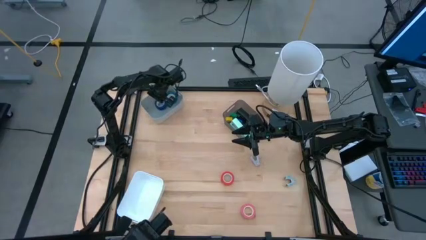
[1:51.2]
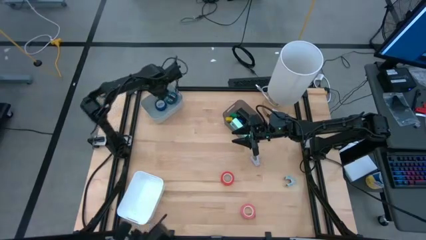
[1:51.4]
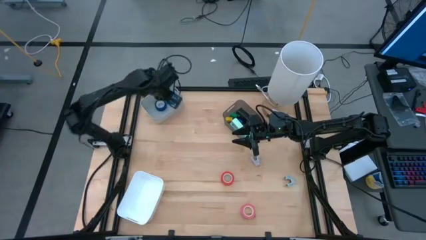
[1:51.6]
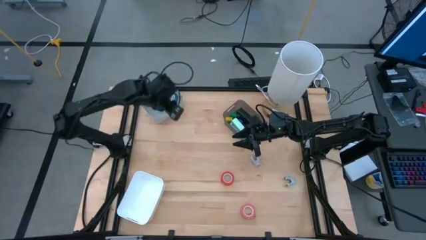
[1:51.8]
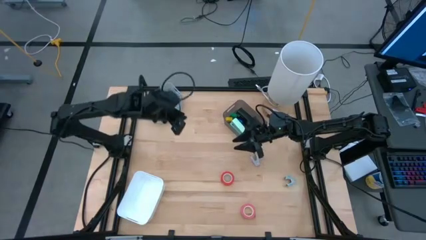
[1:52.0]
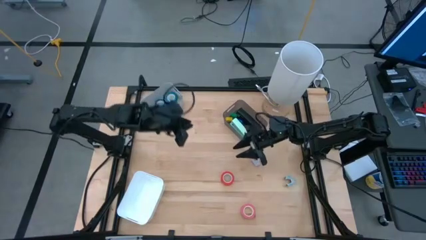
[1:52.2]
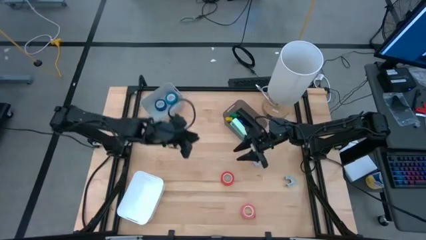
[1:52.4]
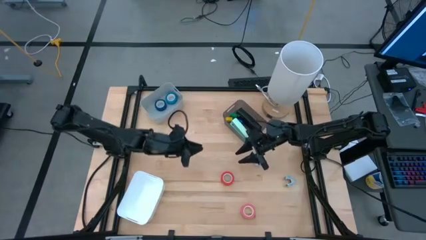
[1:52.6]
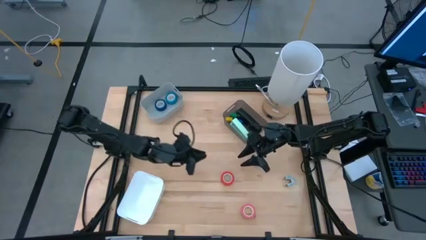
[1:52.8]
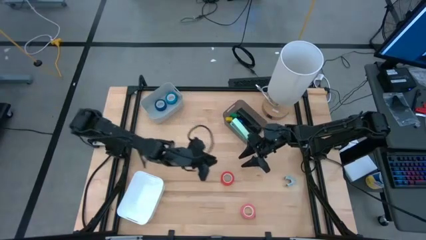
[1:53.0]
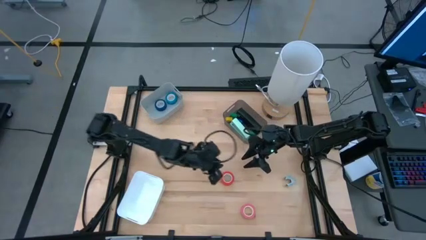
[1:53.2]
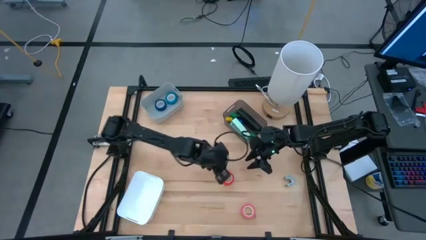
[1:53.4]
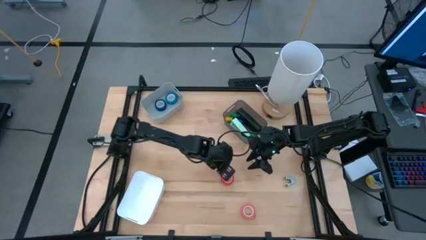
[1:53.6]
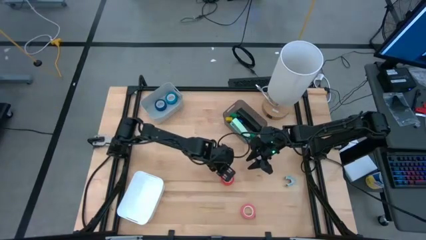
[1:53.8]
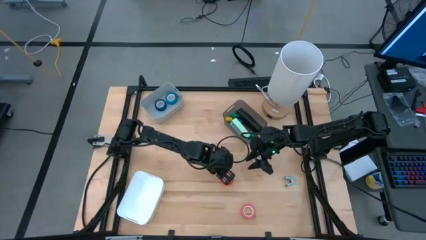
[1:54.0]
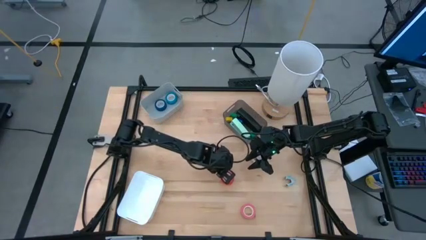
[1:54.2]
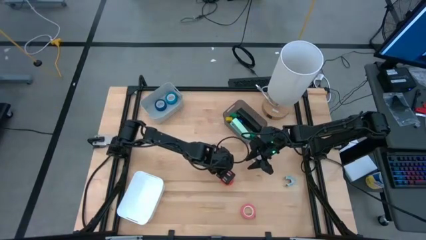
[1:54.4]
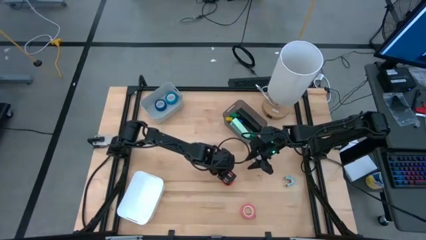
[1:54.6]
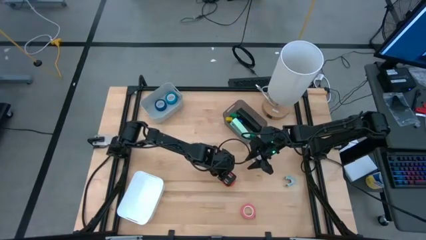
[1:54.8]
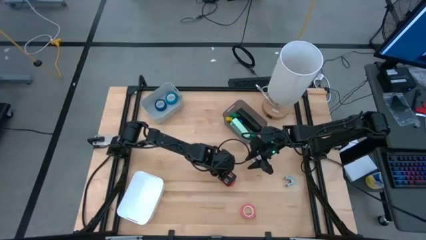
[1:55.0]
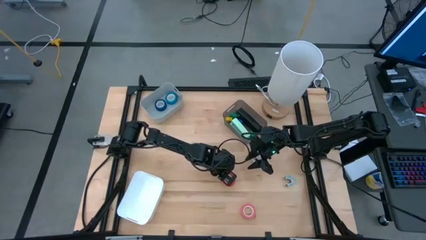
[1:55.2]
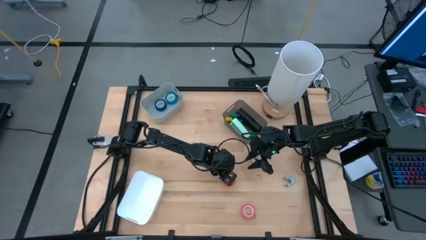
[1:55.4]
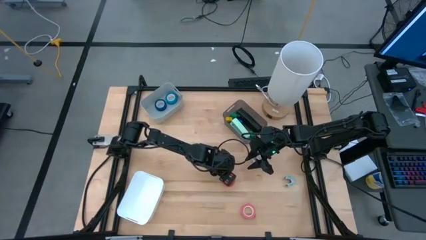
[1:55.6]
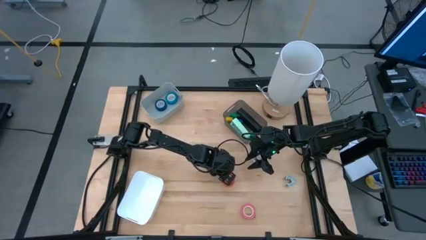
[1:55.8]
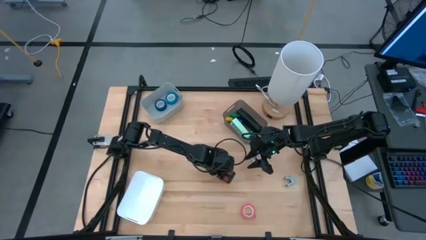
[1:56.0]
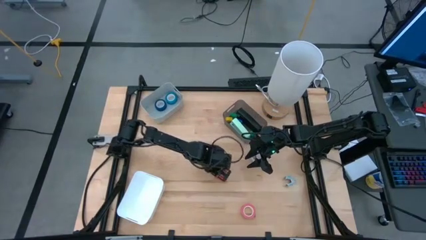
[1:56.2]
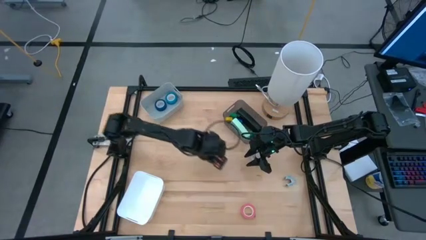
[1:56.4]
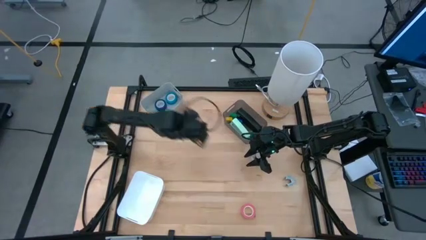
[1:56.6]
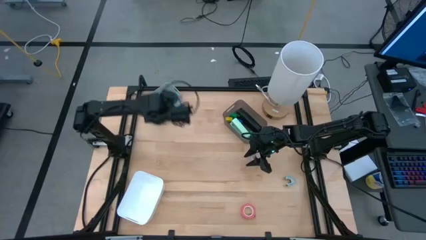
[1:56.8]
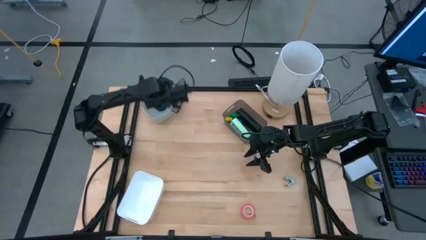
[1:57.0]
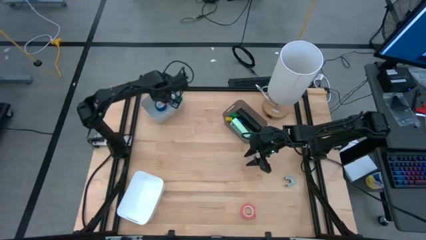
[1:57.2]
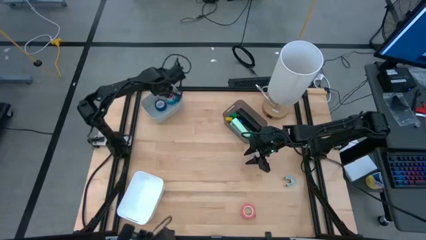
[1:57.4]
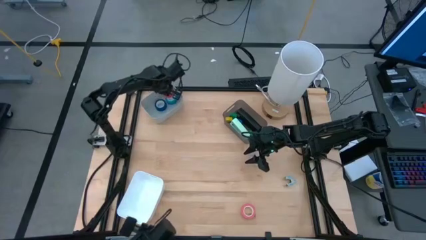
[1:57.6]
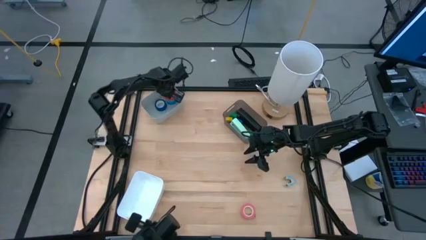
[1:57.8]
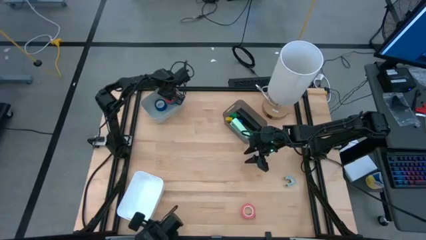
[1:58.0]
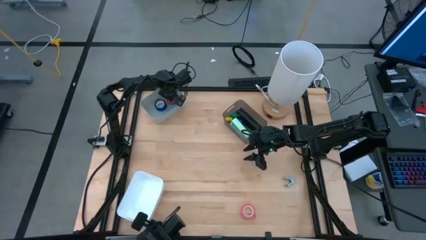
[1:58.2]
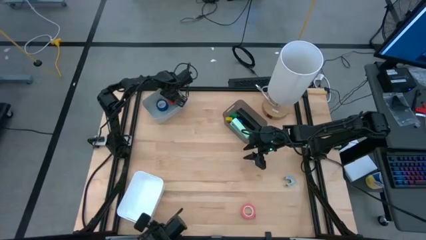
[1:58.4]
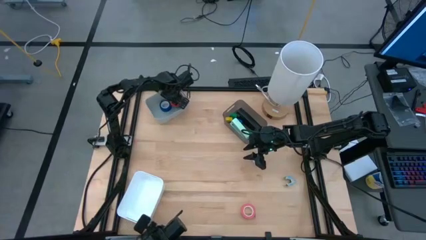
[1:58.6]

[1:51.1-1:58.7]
Task: Pick and place Stapler, Stapler remover, tape
Put the orange tape into the gray bin

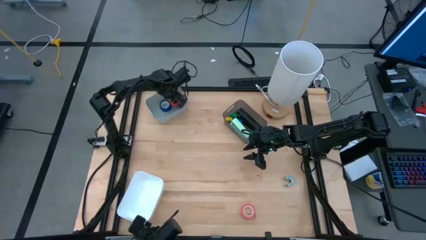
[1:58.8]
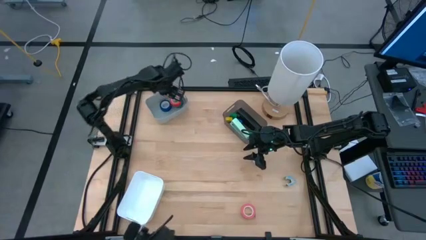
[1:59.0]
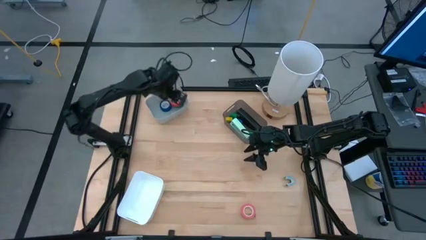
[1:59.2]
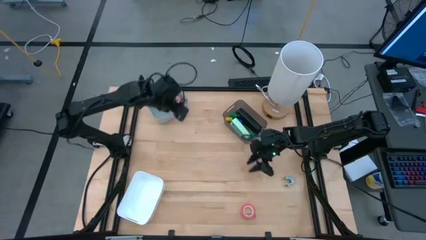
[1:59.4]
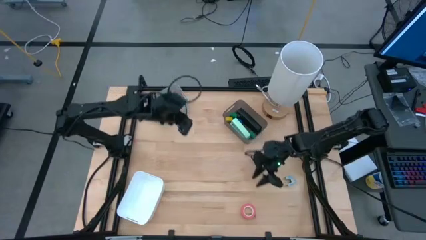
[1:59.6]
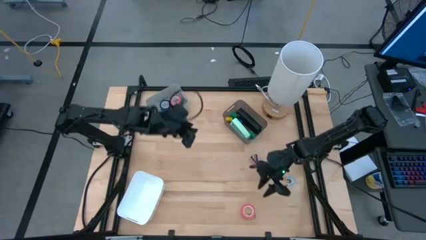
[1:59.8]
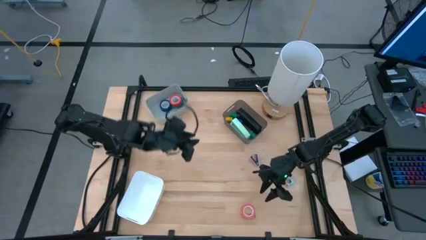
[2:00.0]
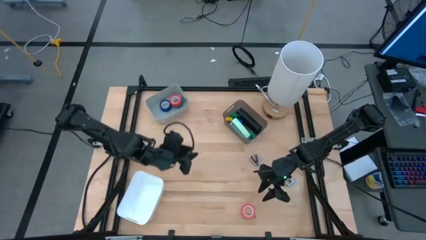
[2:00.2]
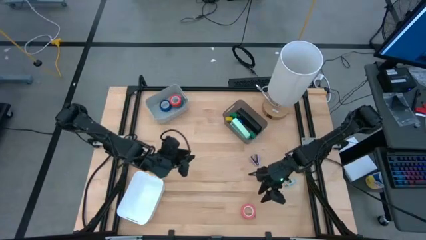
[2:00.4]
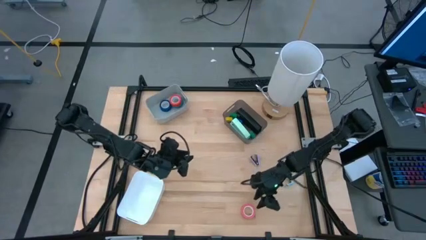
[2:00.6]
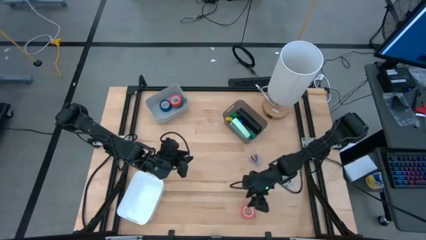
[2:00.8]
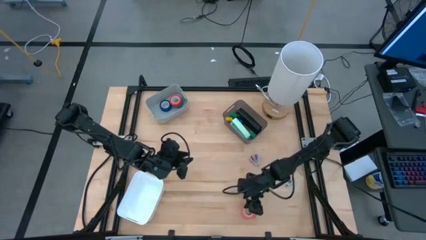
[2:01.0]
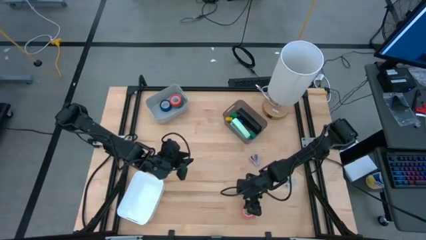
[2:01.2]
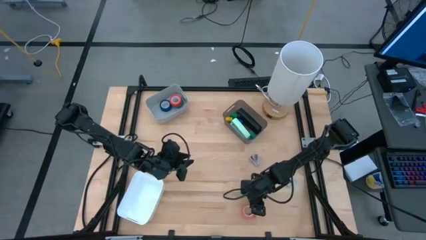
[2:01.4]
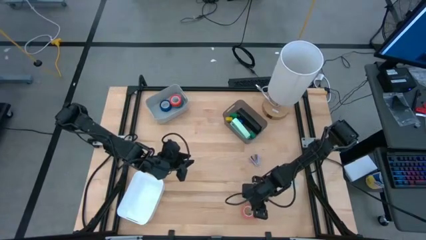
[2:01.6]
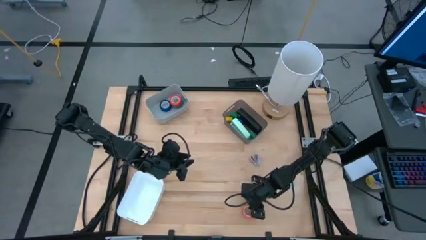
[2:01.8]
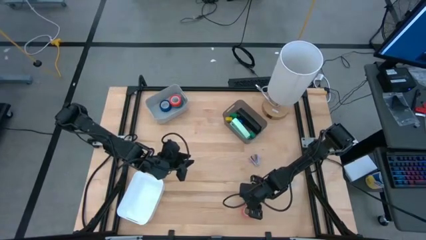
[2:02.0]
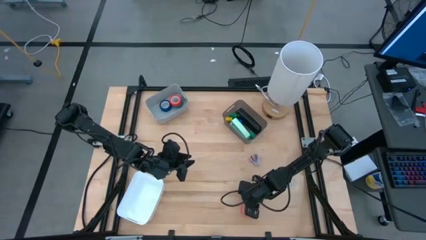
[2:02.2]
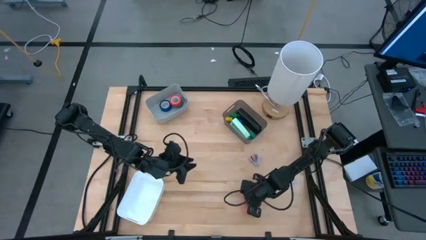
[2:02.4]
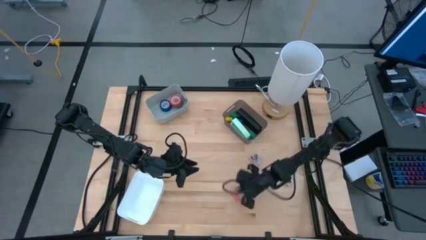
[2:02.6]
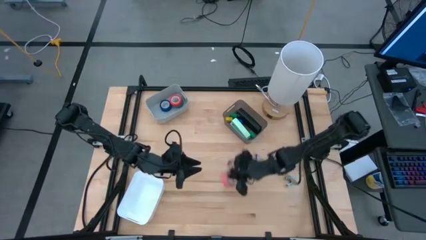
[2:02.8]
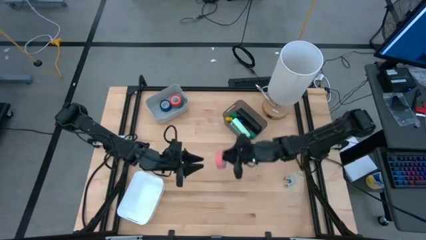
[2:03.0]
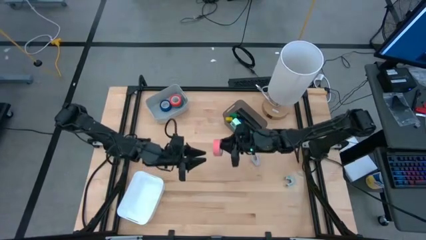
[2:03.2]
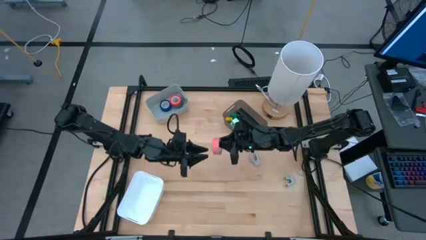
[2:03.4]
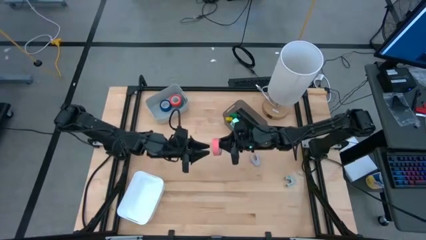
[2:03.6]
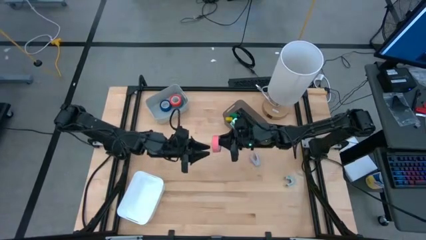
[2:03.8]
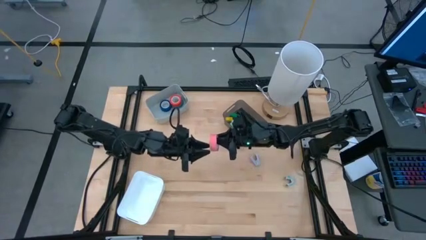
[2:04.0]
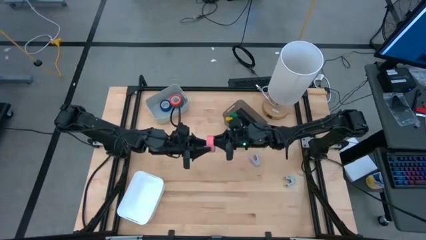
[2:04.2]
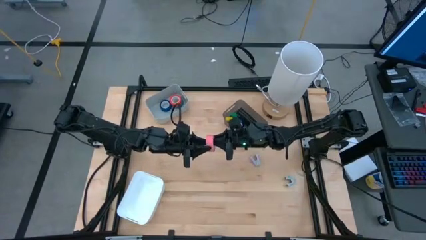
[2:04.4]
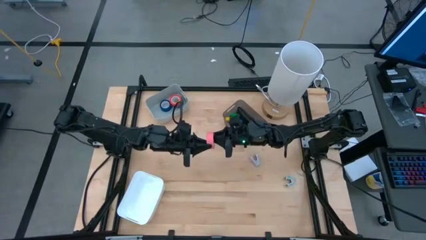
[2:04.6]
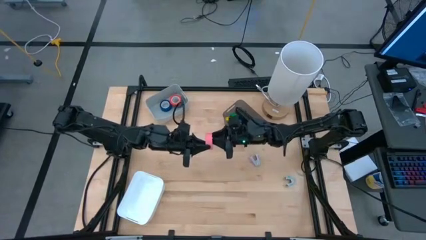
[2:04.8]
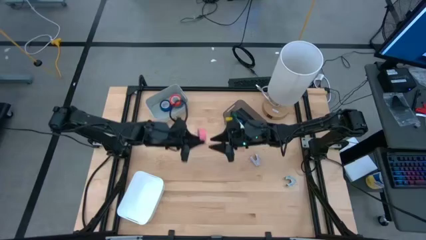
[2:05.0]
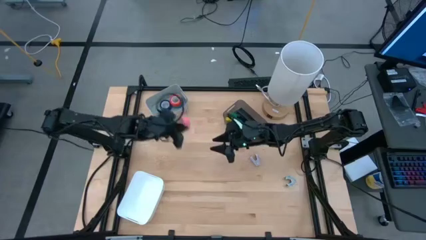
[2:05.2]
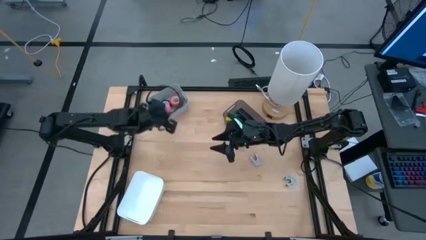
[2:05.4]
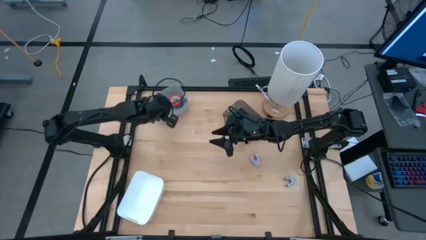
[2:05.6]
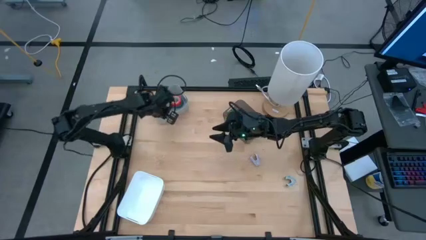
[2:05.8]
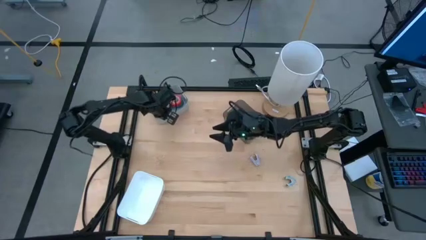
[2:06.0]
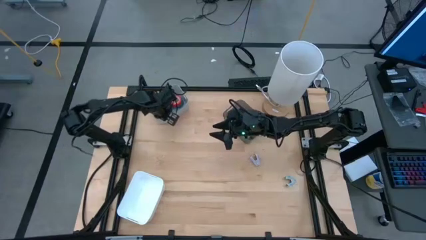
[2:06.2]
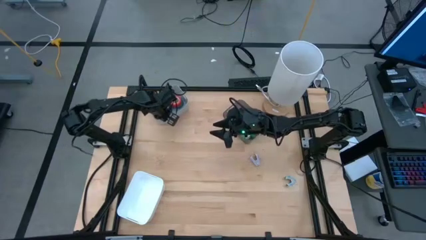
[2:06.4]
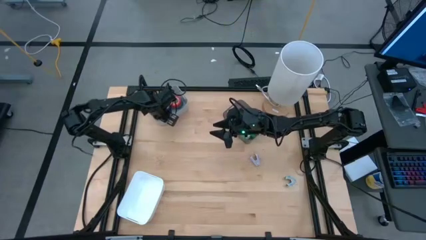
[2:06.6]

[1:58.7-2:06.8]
Put the pink tape into the gray bin

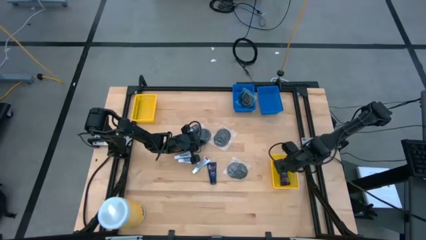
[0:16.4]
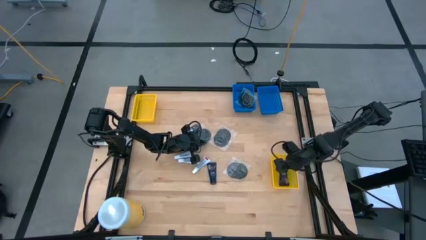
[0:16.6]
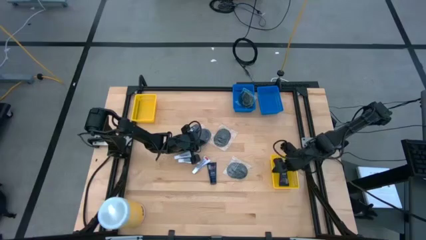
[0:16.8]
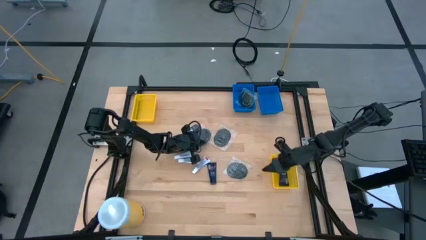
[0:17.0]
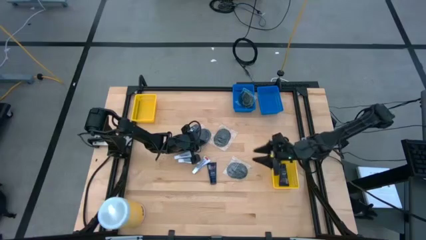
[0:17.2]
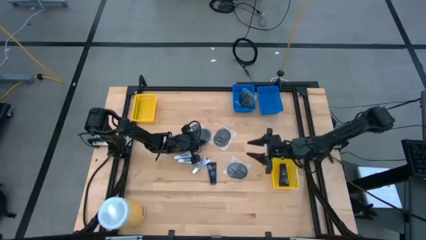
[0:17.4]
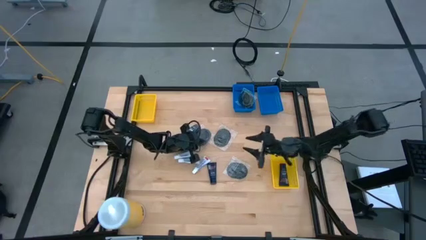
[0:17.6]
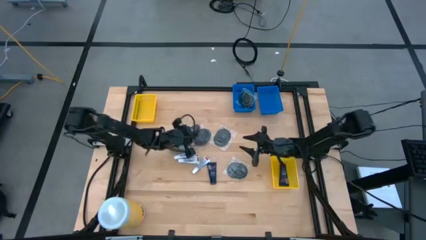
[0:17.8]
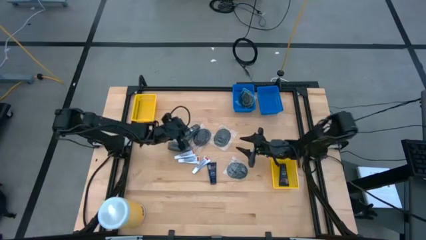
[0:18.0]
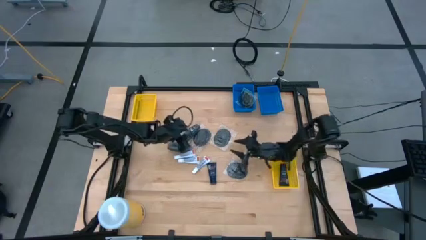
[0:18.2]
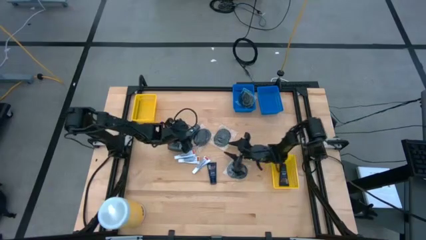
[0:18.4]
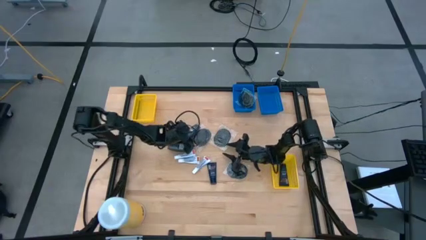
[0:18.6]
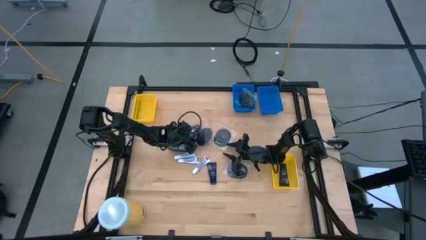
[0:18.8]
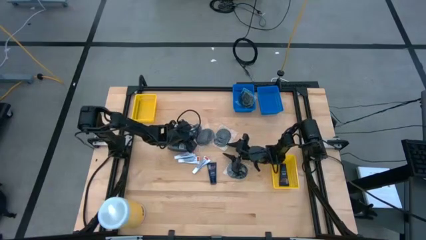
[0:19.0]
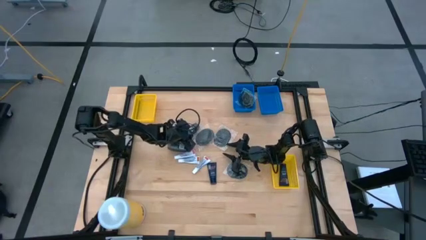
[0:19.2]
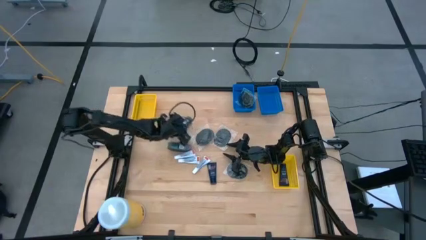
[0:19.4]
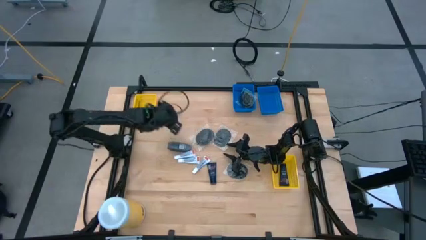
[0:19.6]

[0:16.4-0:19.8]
Task: Pick & Place Travel size toiletries
Put the black roll-on deodorant into the right yellow bin
